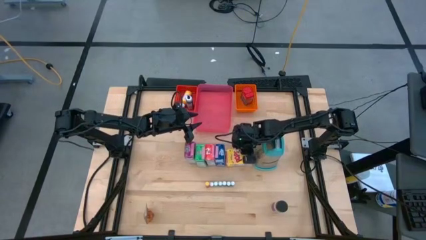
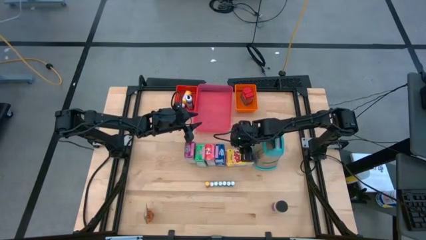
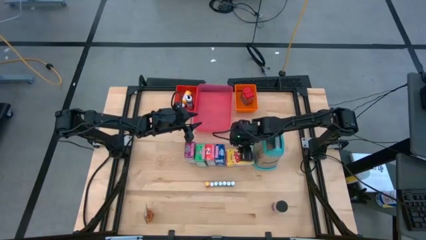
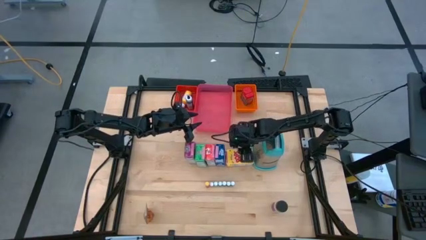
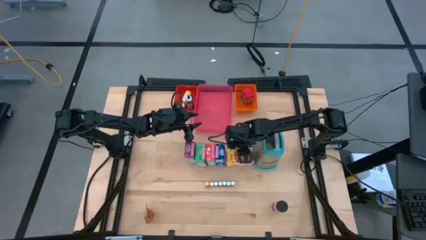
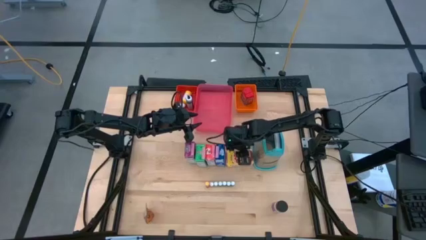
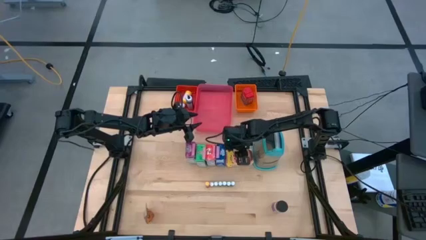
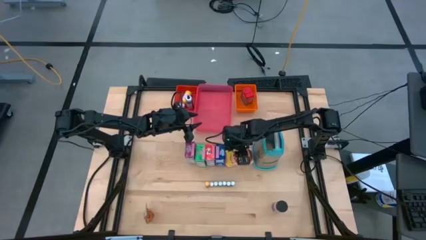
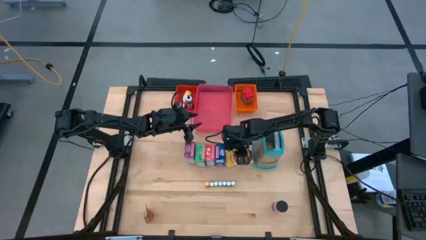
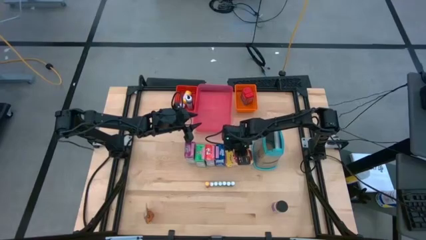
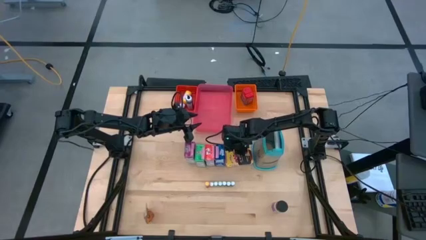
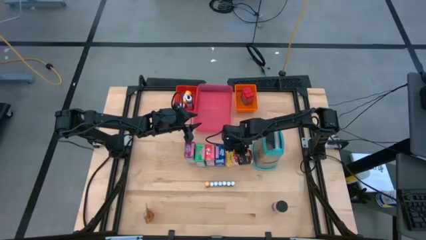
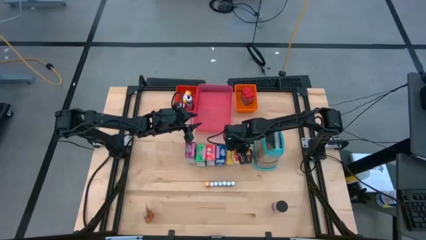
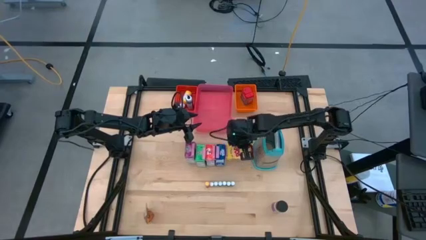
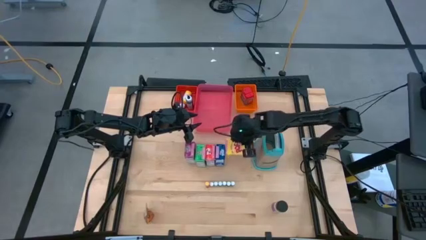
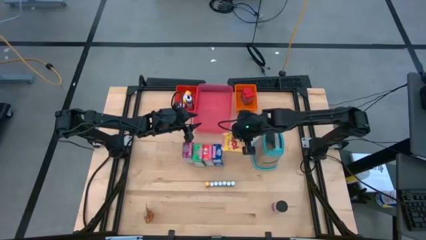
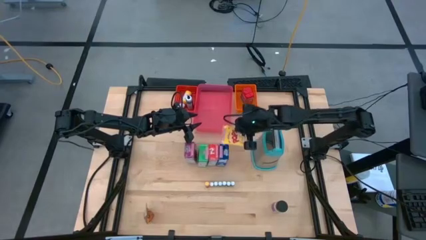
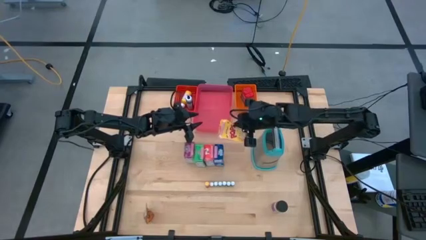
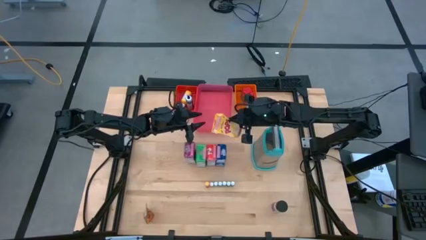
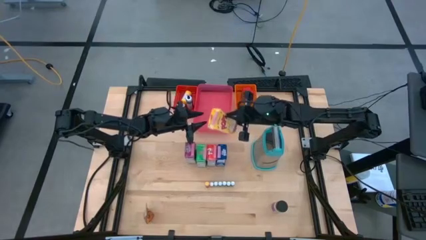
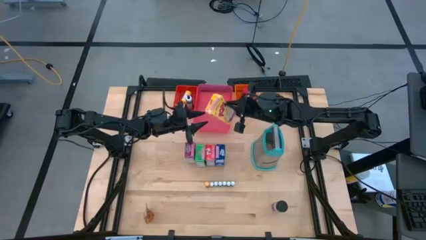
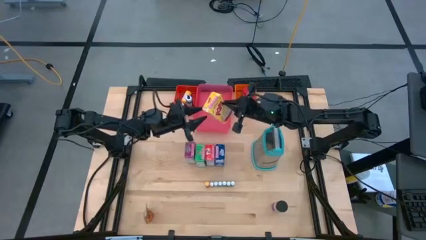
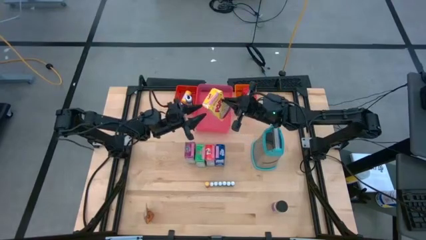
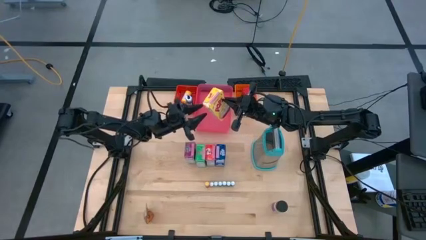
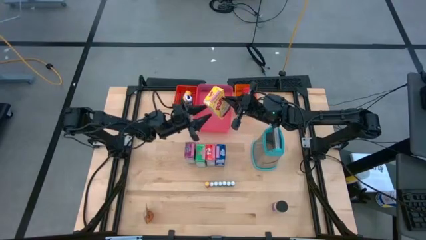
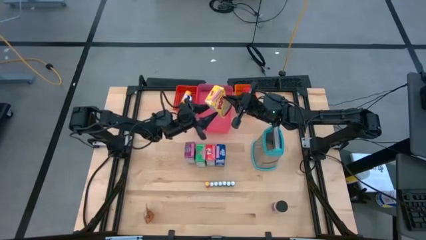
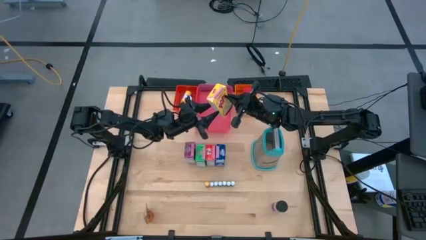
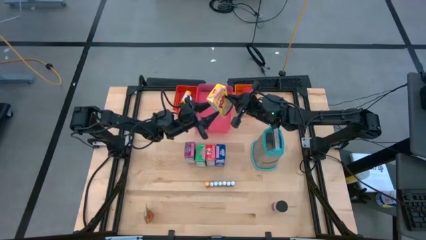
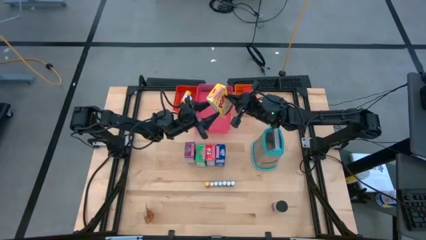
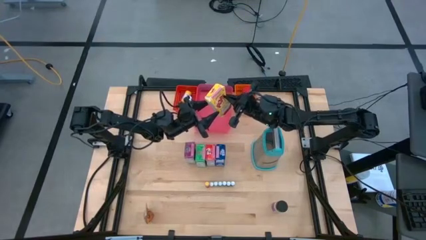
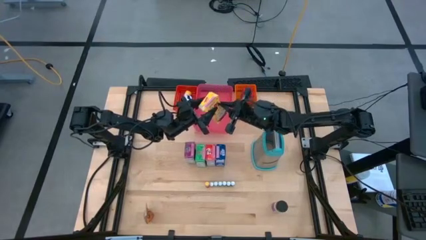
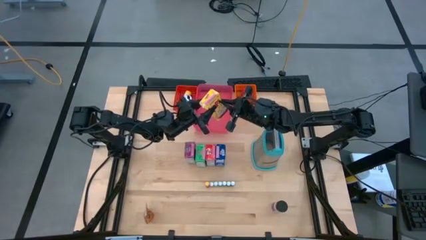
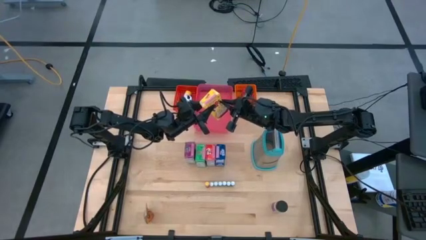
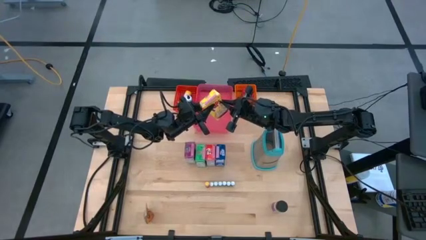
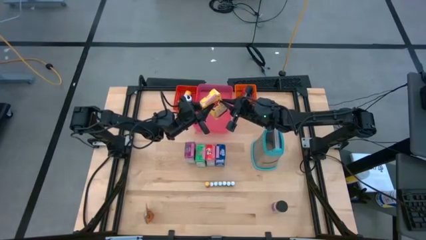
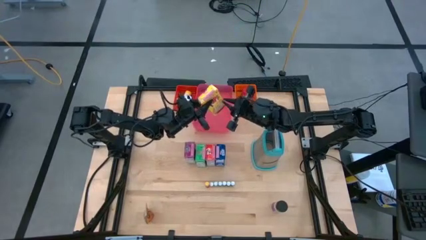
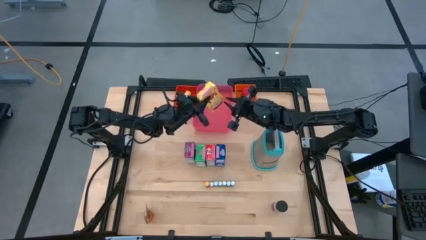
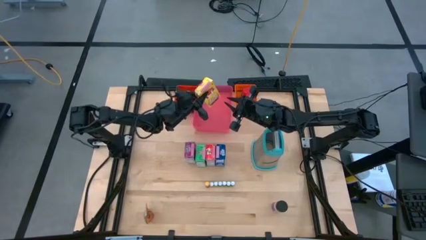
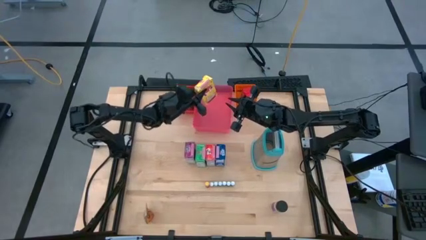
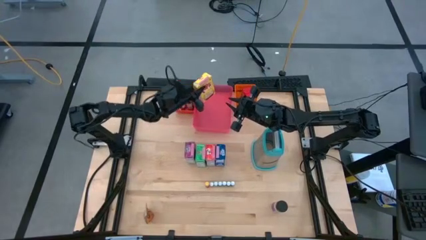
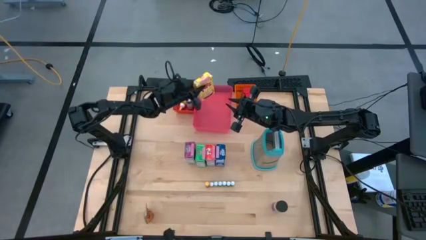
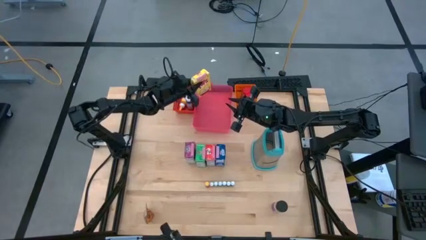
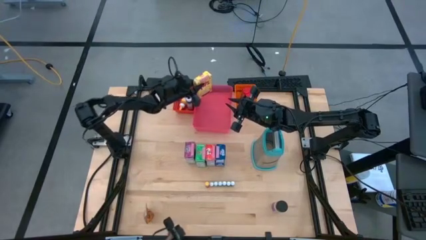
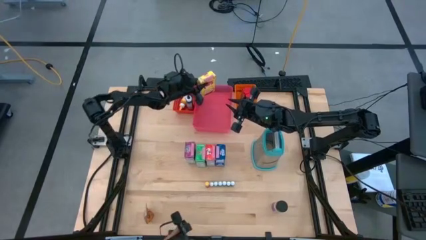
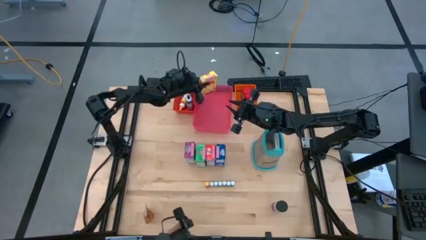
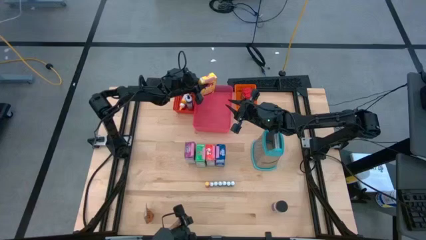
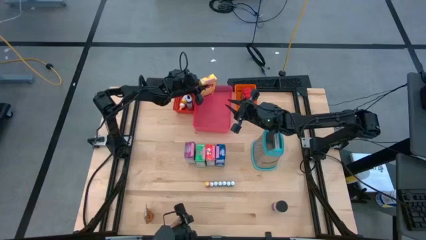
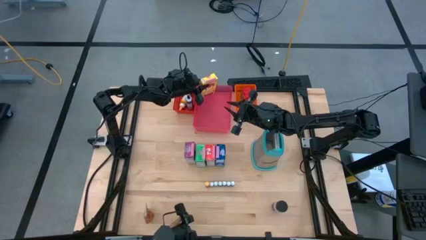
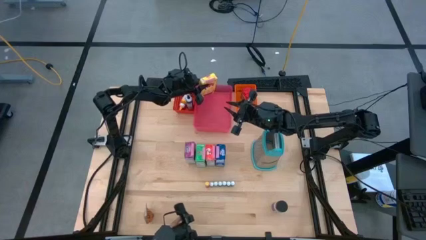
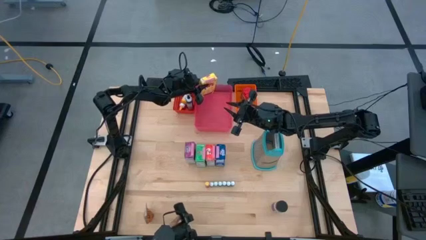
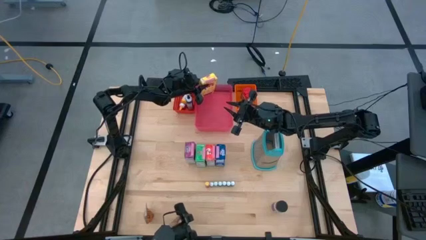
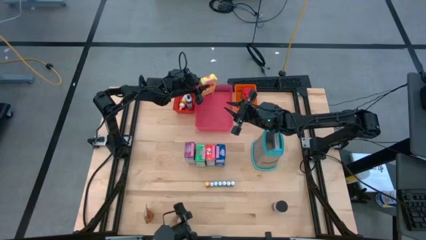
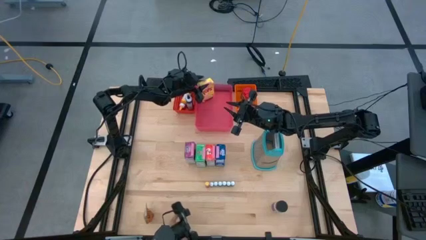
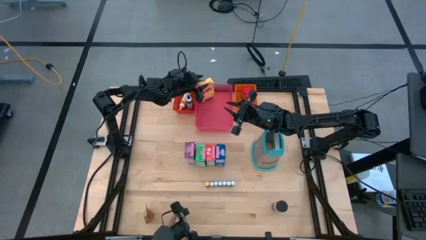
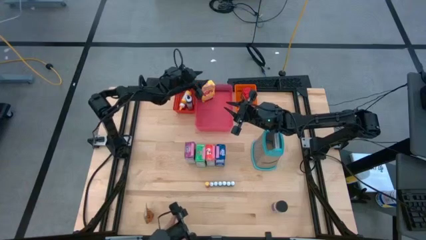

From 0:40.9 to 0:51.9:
Task: Pick & Place Kitchen Items
Put the yellow cereal box into the pink bin

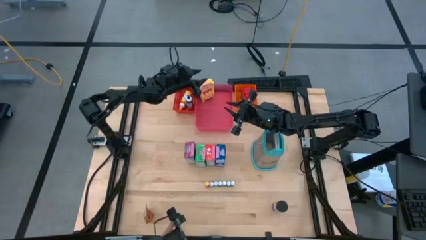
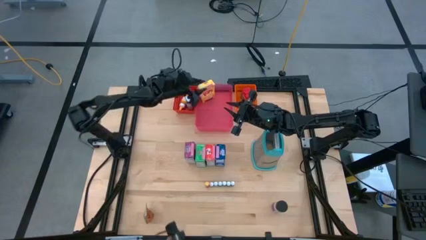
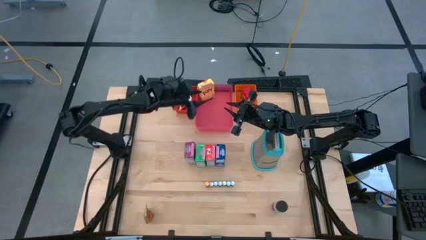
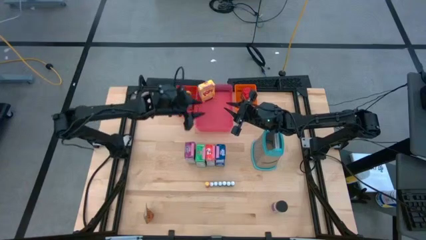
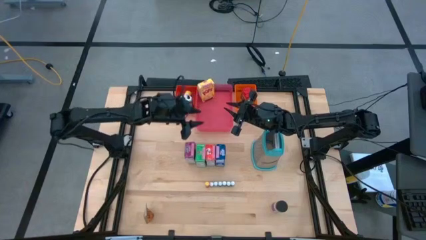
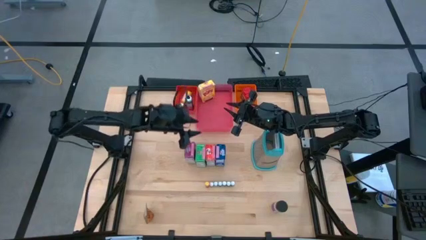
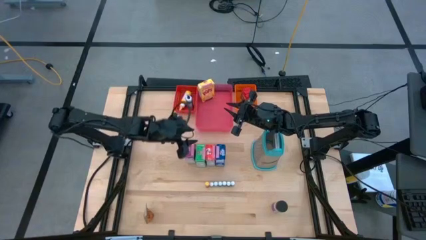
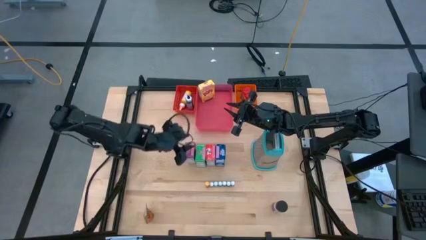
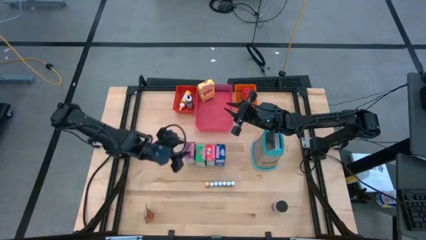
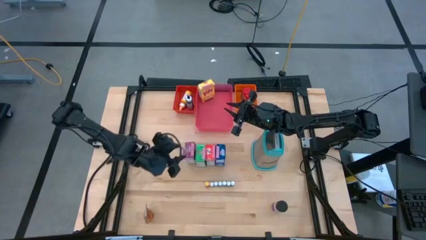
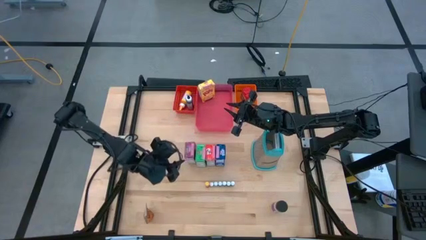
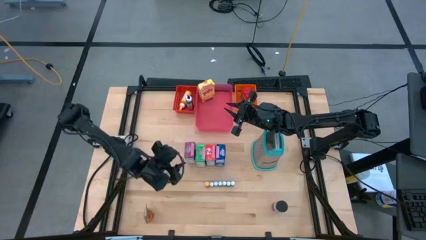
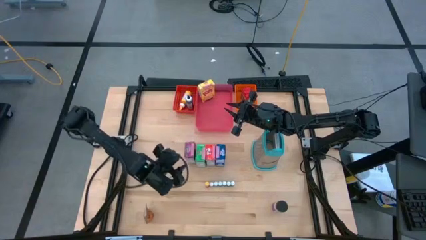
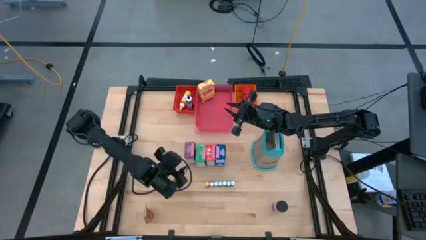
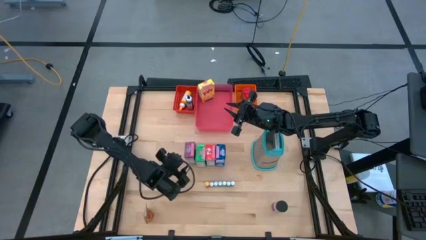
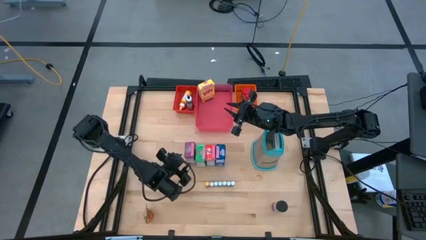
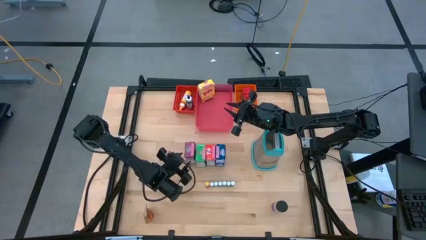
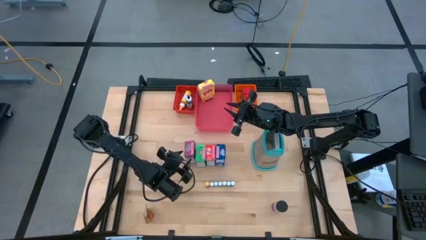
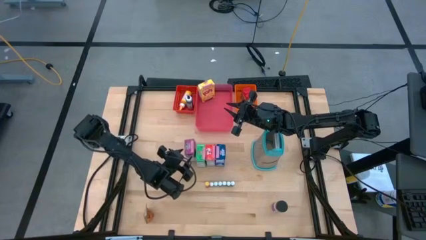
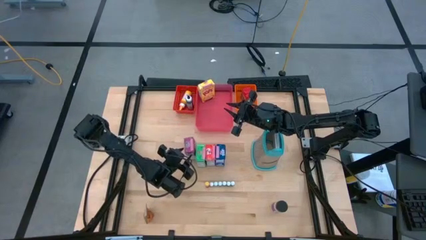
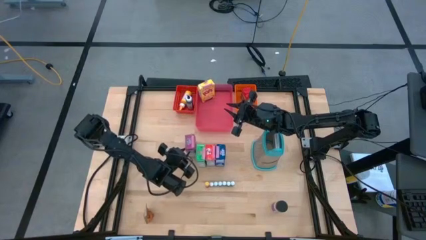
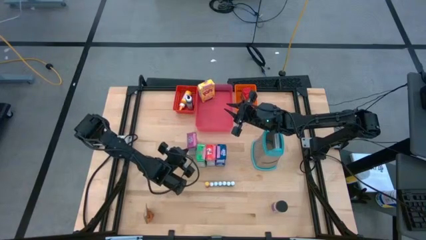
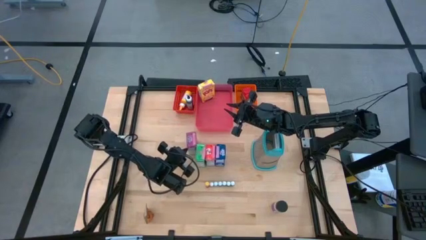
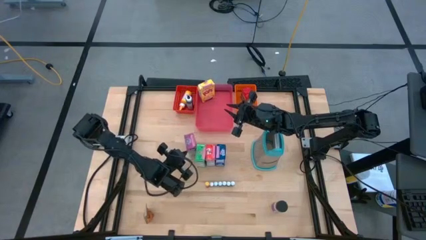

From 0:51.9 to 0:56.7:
Put the violet cereal box into the pink bin
